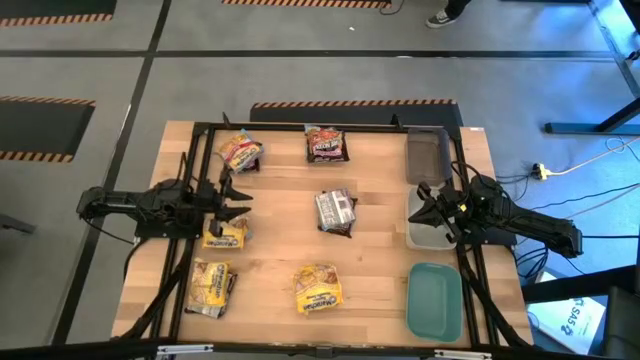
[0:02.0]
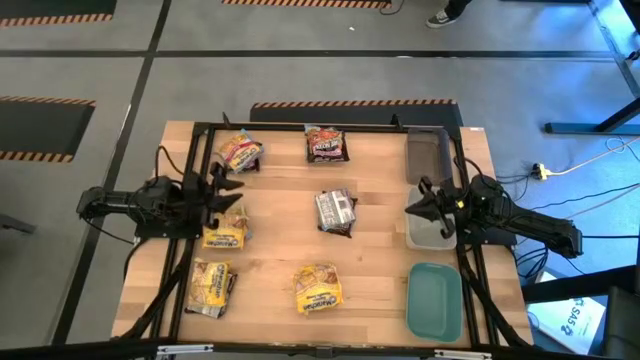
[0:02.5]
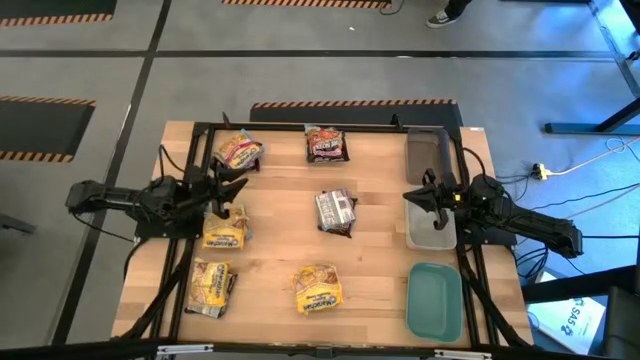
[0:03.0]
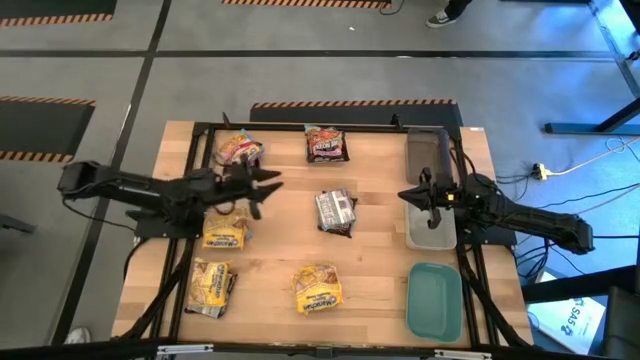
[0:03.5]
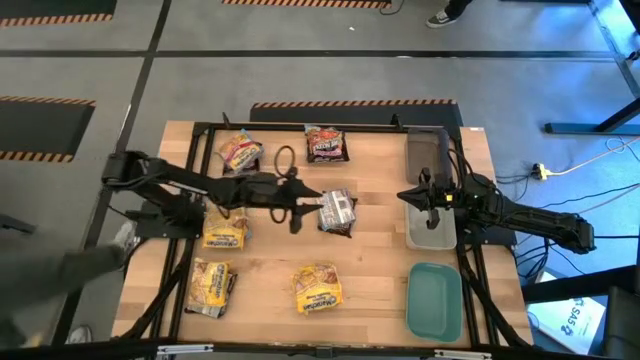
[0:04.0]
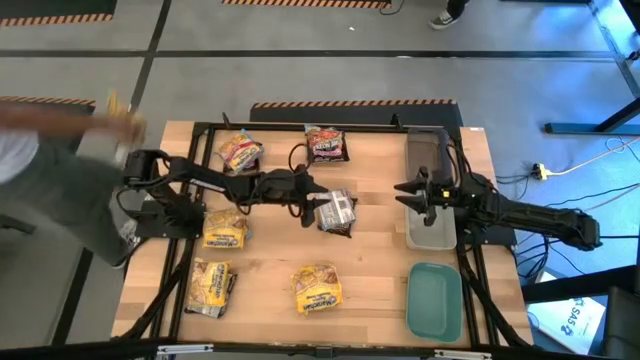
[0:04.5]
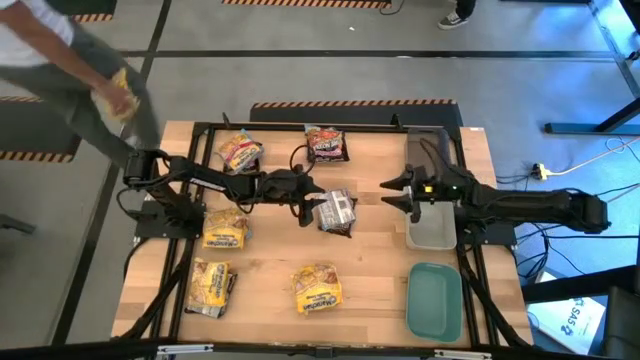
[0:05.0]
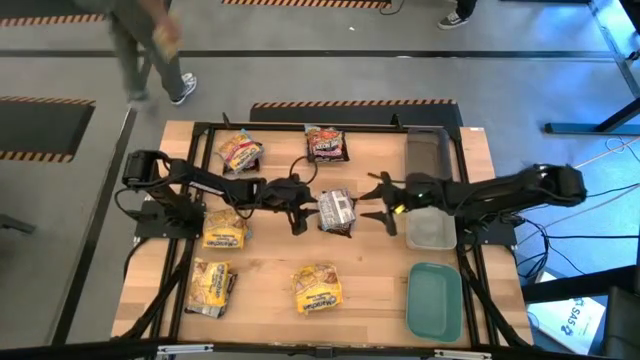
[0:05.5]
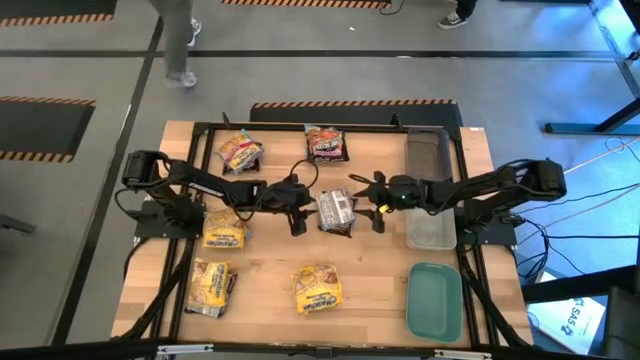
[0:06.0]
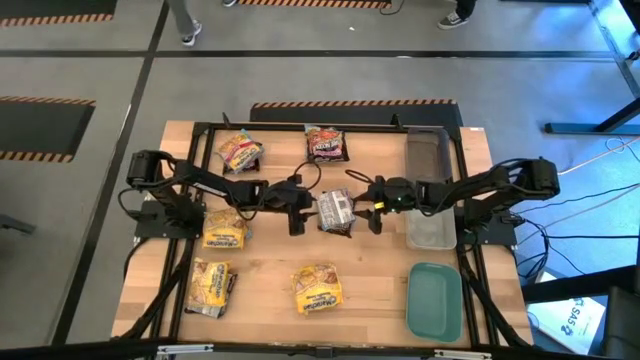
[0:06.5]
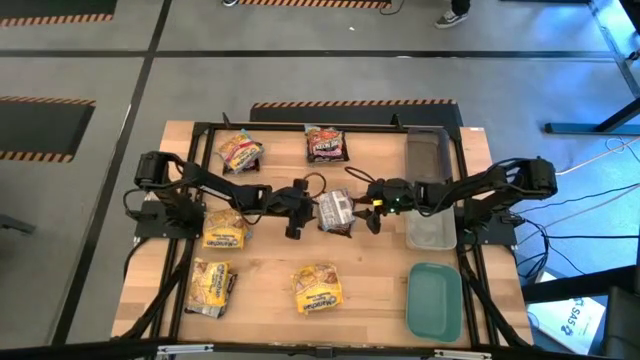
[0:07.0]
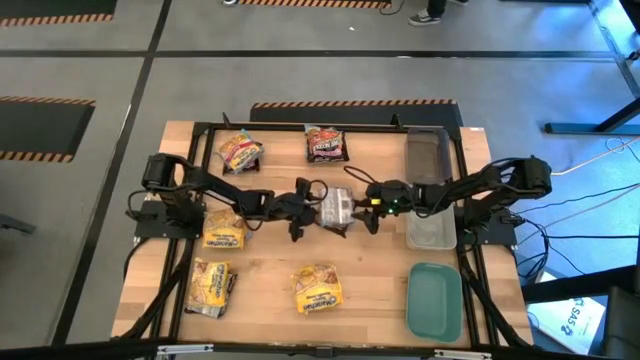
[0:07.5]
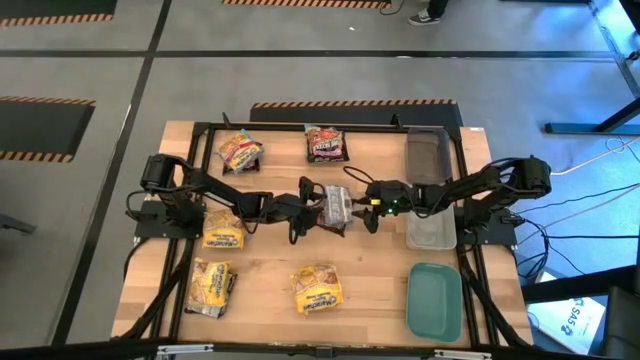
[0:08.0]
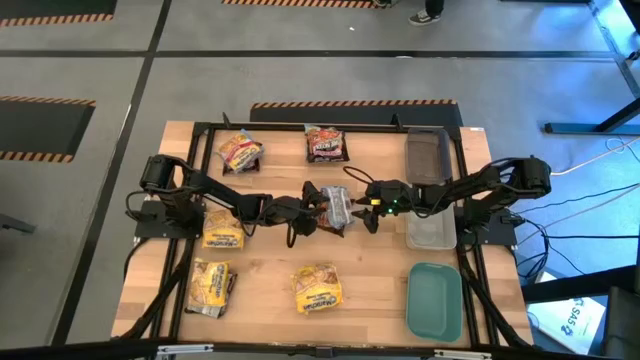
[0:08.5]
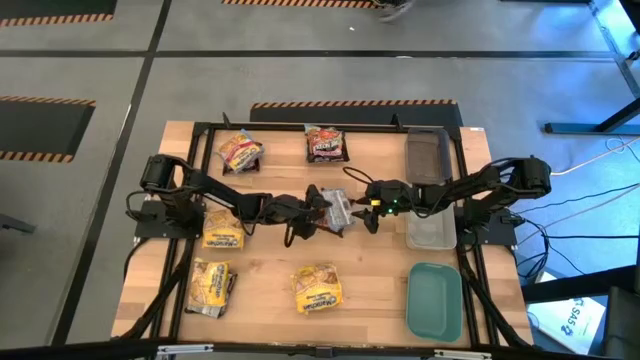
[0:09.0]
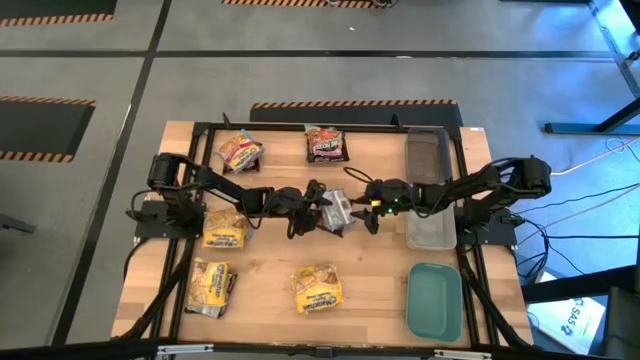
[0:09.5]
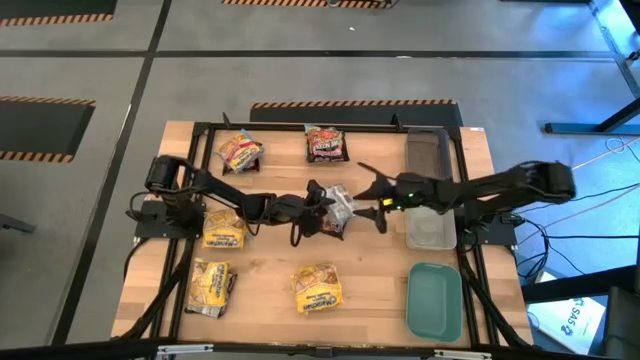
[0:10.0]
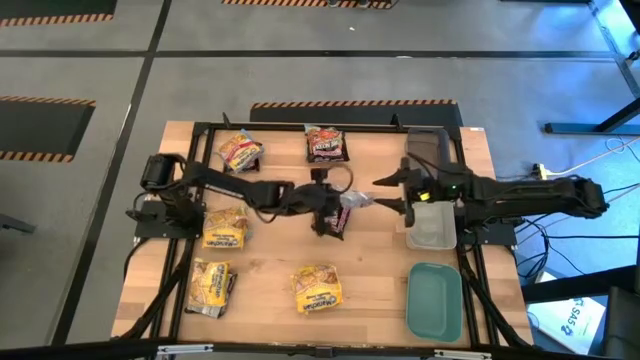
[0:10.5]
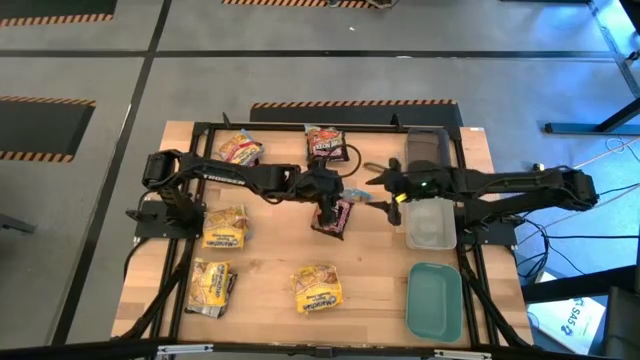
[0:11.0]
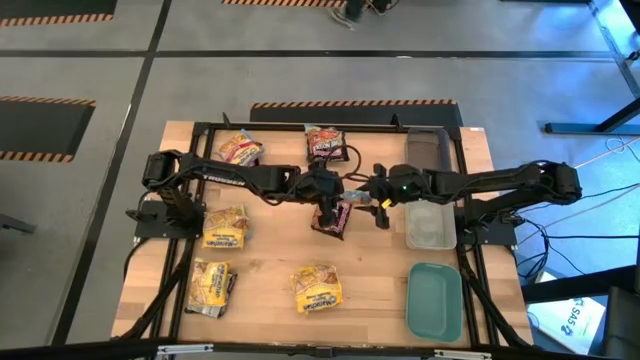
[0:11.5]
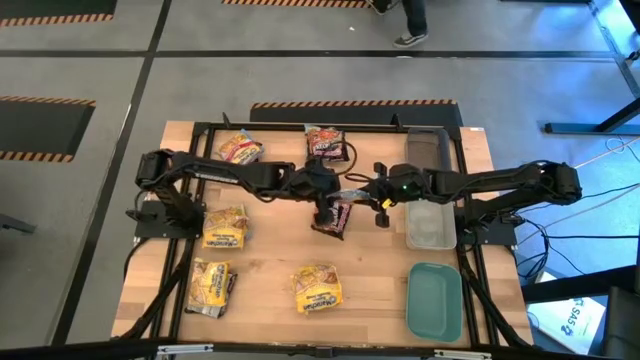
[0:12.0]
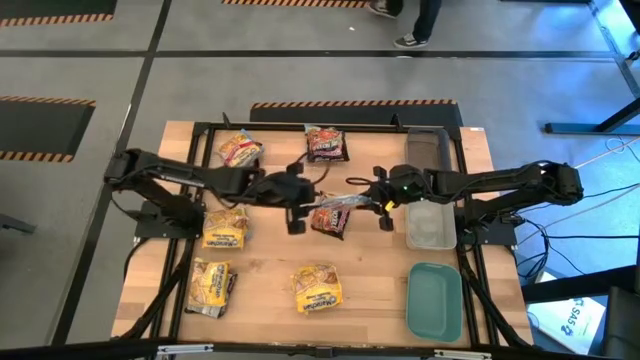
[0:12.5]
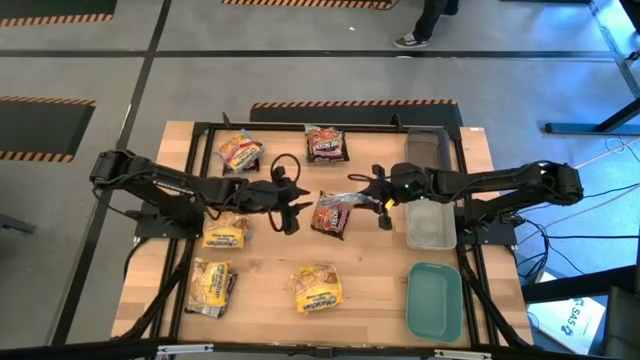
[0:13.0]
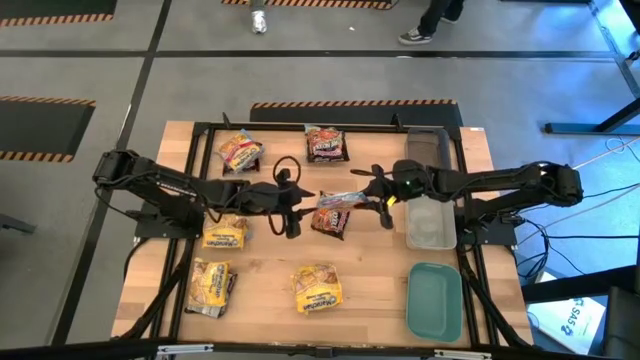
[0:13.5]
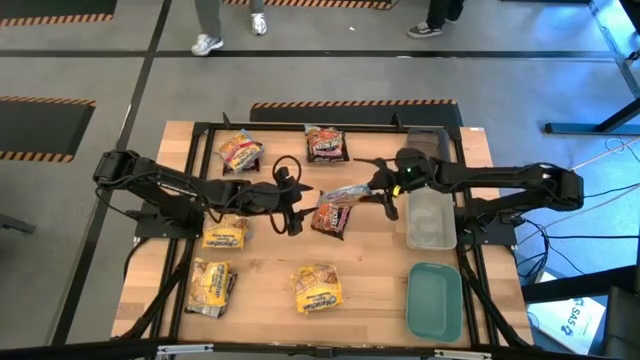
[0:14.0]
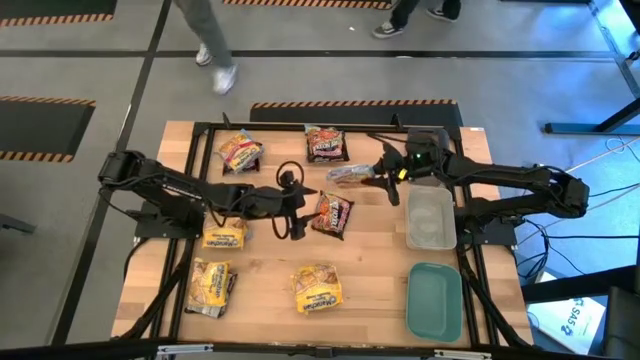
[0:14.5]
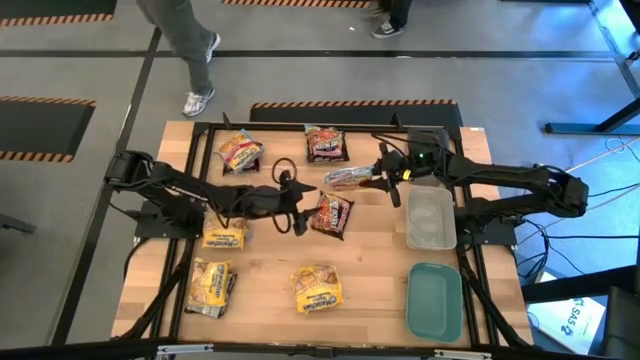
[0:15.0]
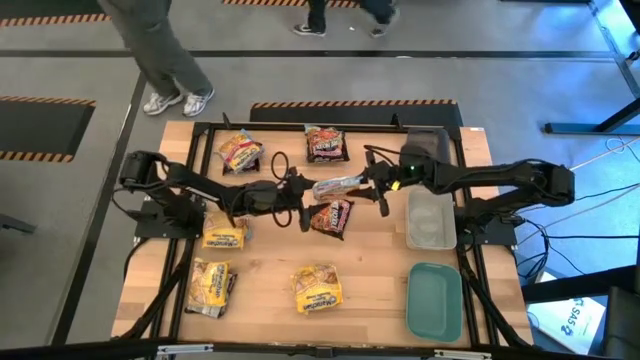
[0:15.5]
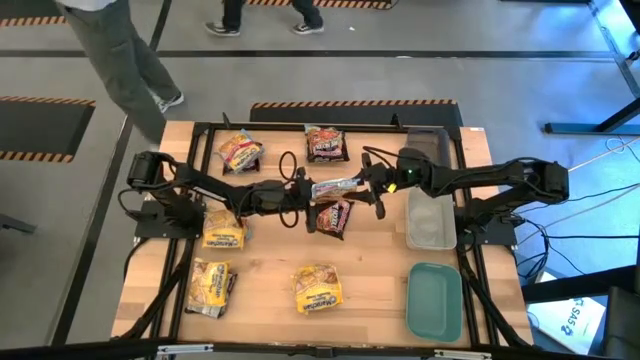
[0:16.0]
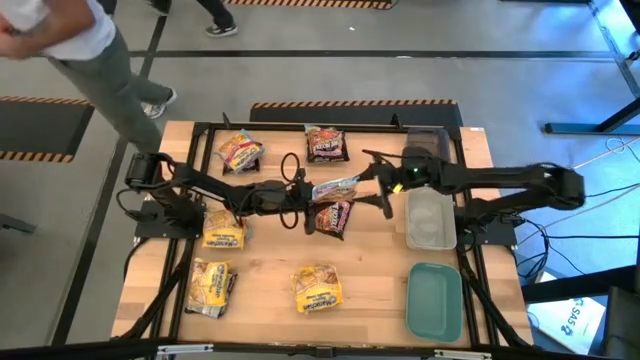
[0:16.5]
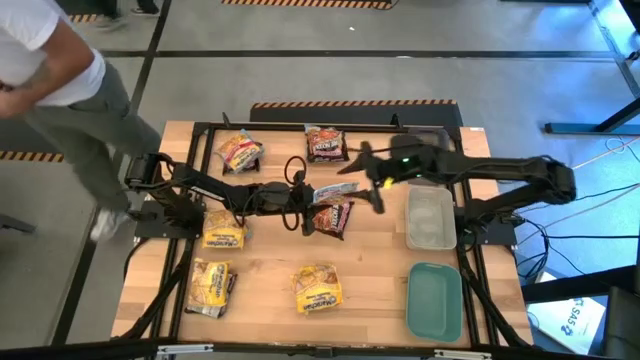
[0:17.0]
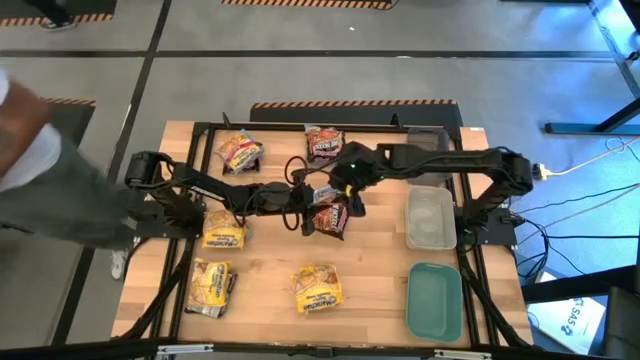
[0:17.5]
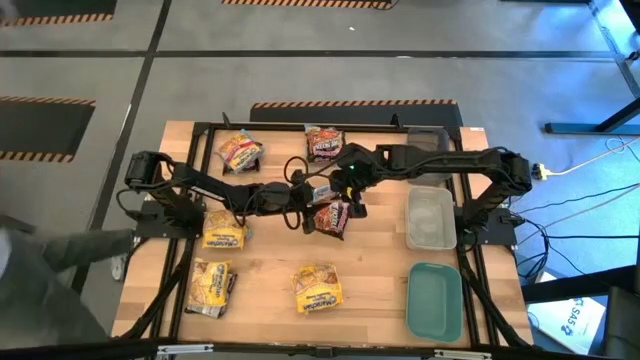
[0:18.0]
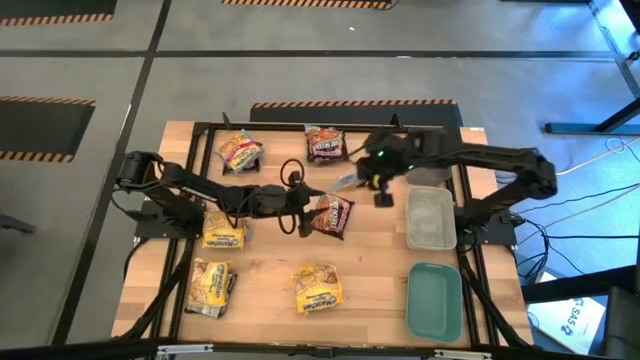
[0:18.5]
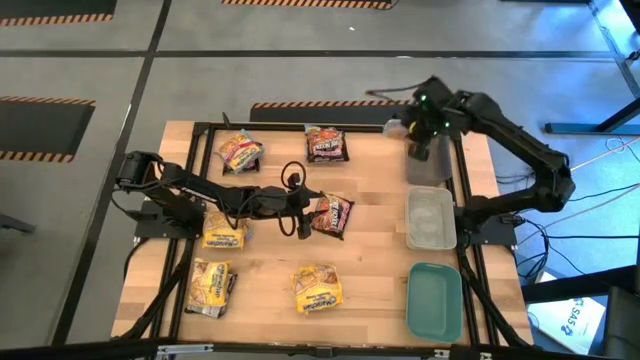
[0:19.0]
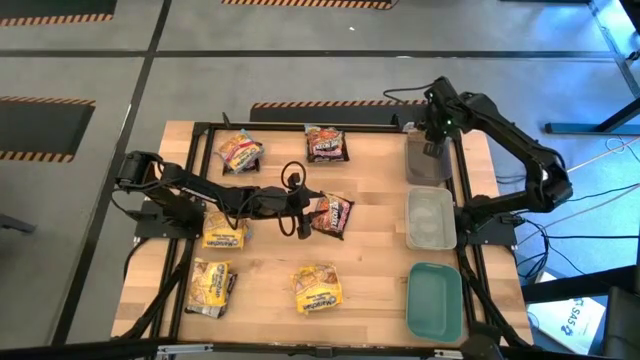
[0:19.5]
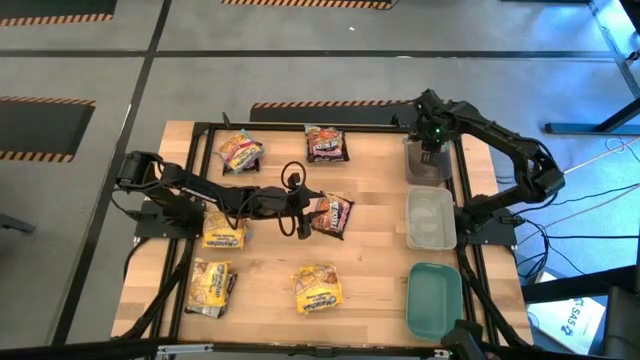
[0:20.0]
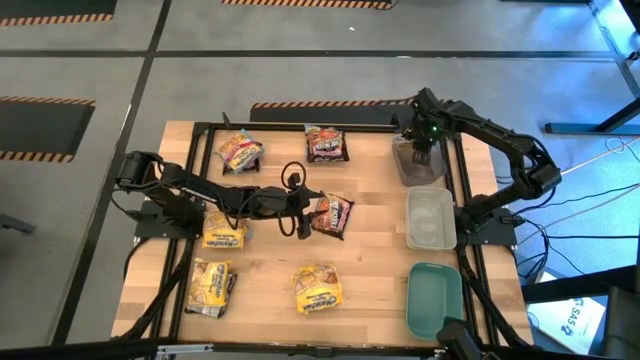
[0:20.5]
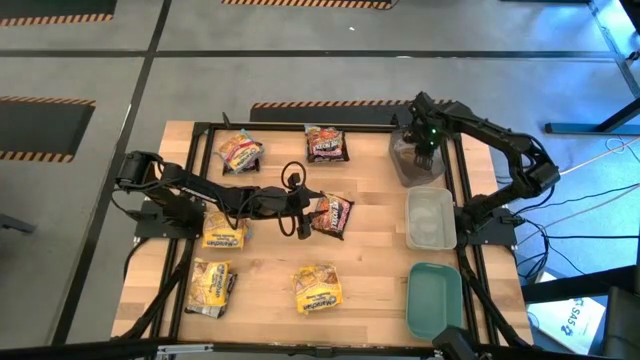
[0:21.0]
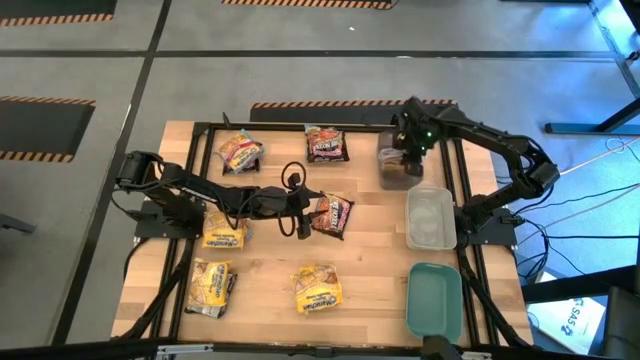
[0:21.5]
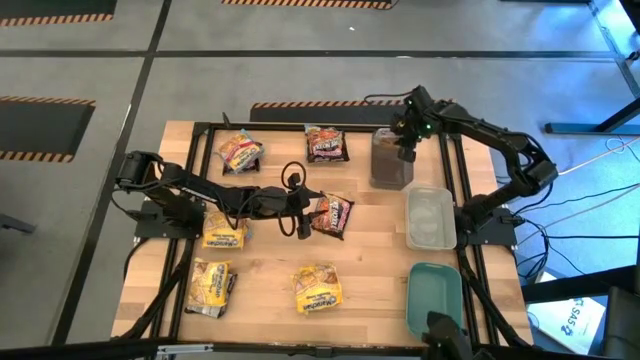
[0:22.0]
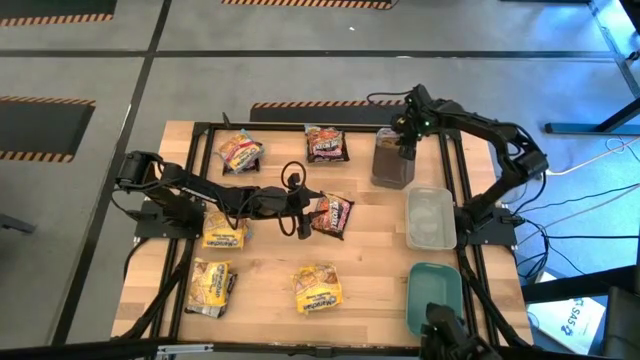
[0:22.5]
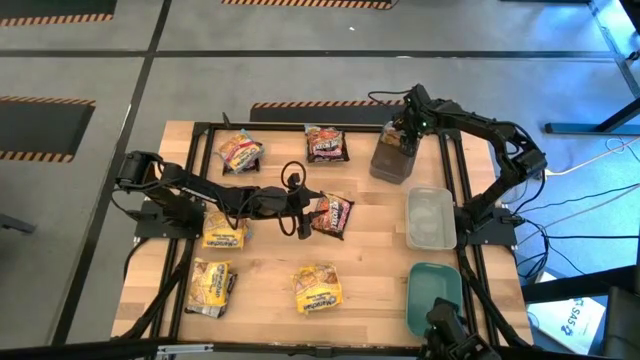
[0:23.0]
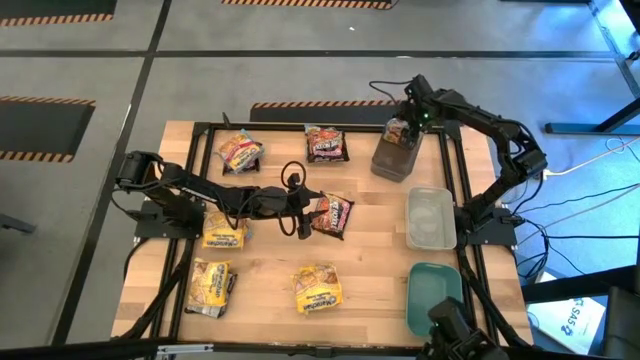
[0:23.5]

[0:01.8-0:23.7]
Task: Sort Maruchan noodles
Put the blue noodle pack into the black bin
